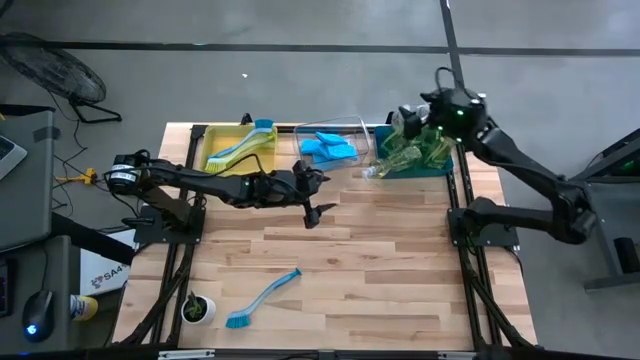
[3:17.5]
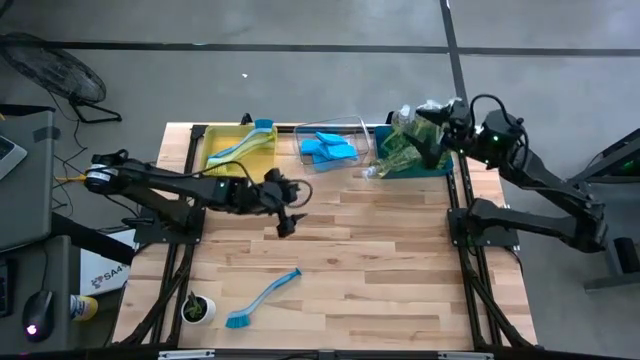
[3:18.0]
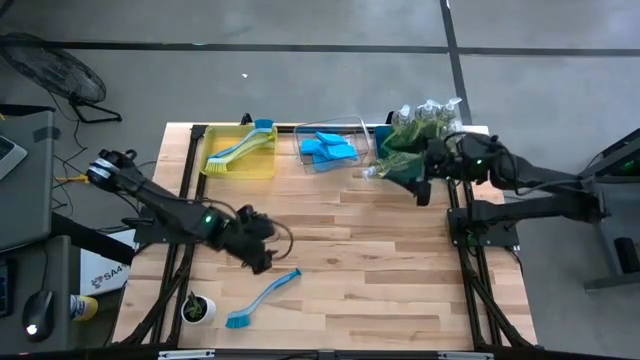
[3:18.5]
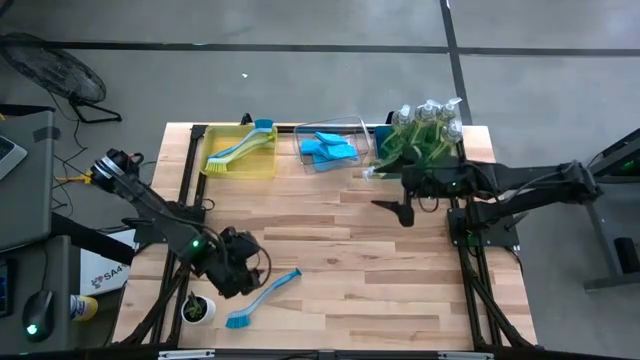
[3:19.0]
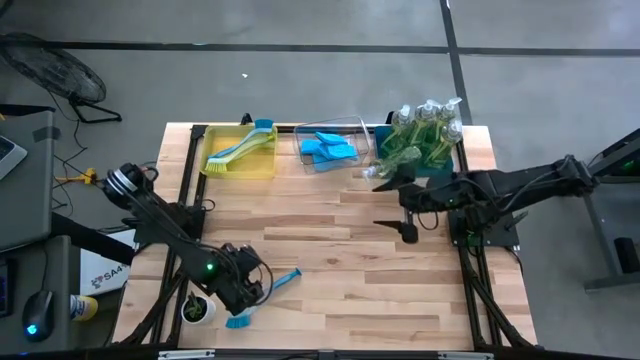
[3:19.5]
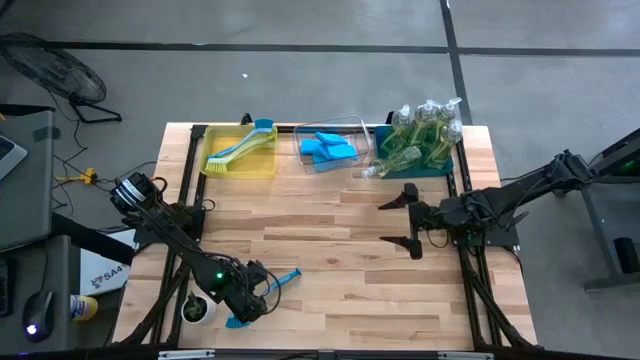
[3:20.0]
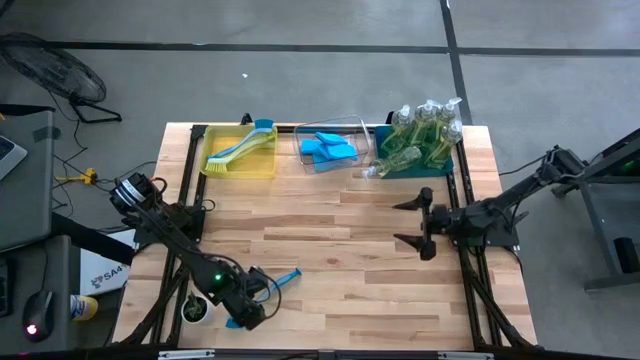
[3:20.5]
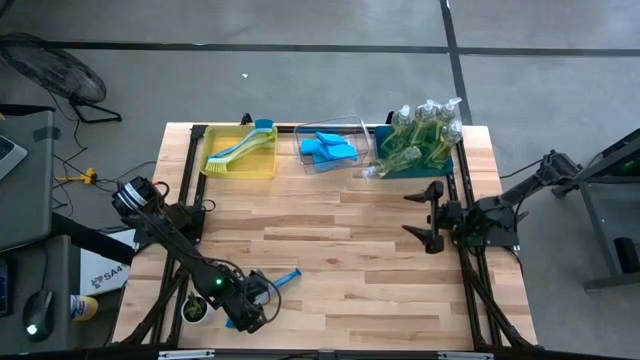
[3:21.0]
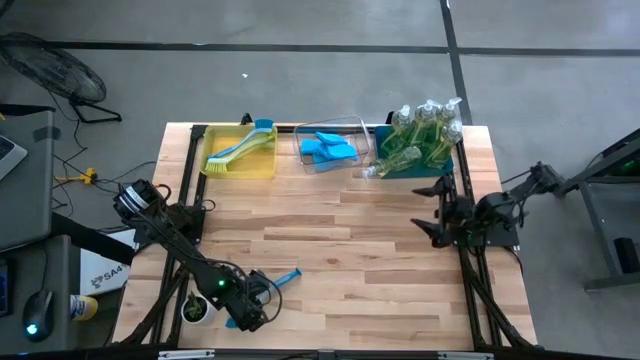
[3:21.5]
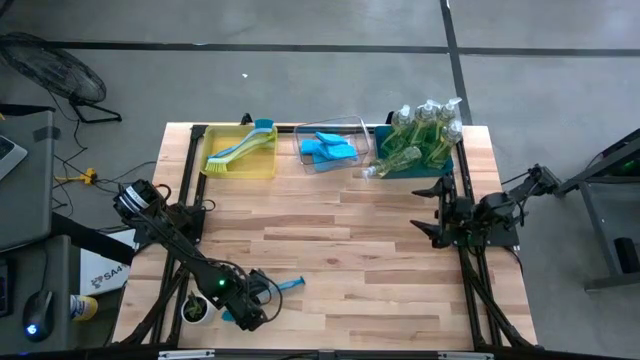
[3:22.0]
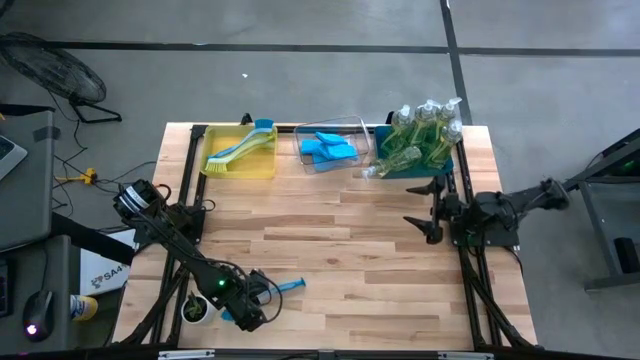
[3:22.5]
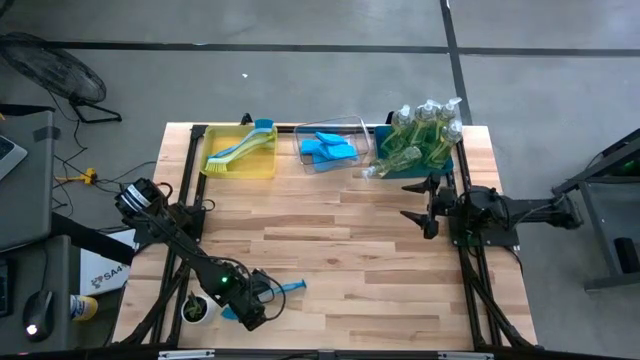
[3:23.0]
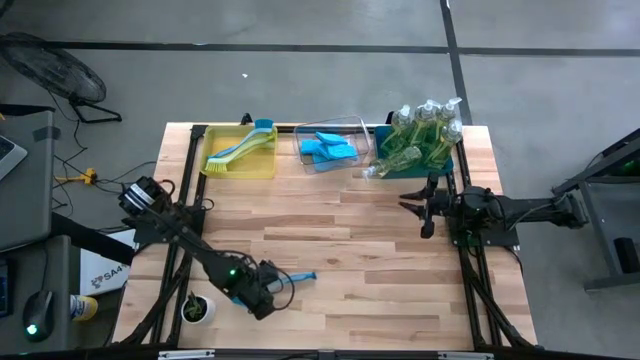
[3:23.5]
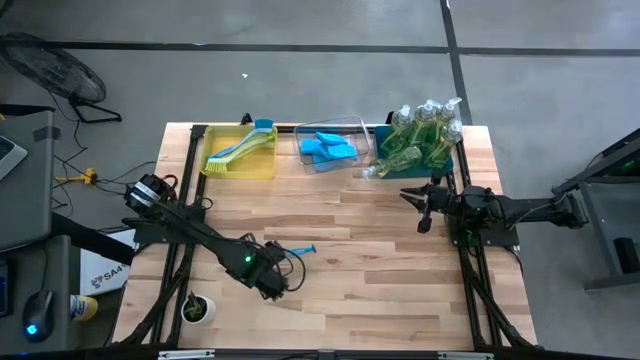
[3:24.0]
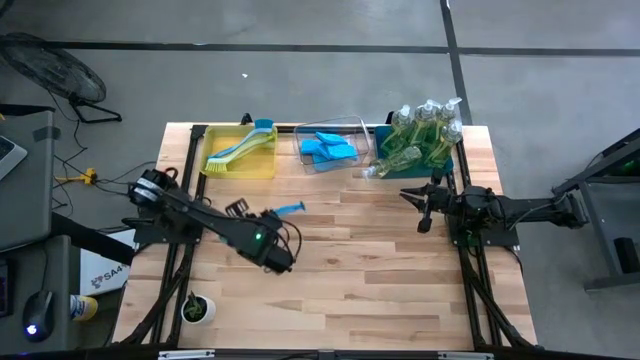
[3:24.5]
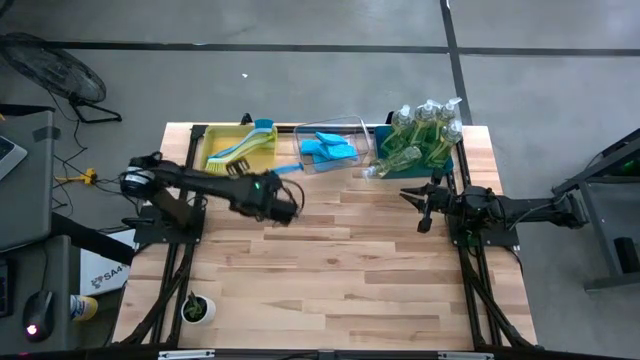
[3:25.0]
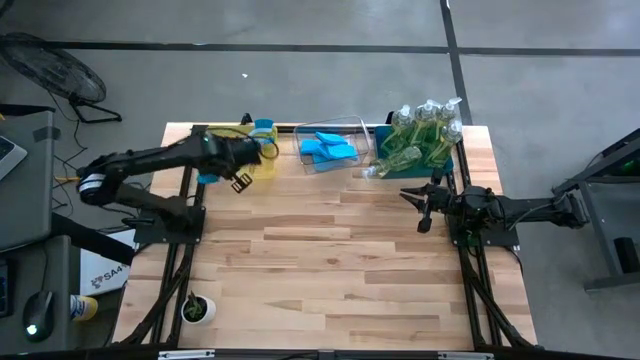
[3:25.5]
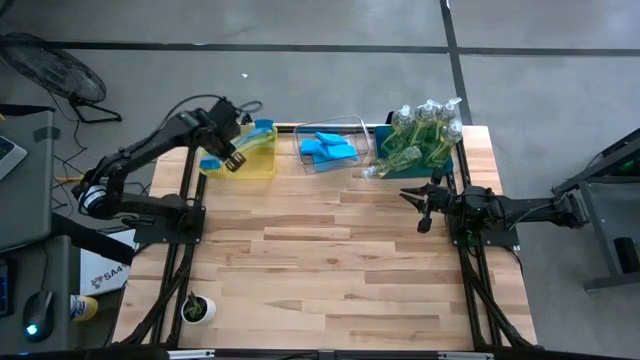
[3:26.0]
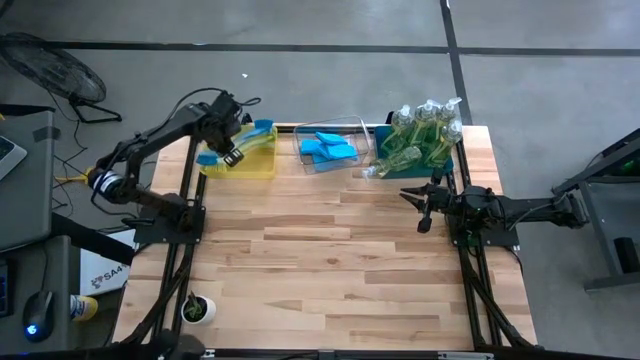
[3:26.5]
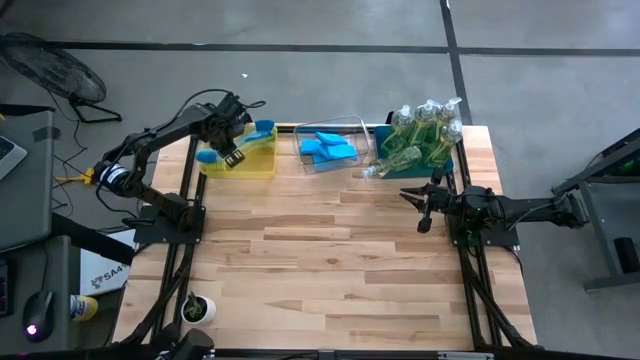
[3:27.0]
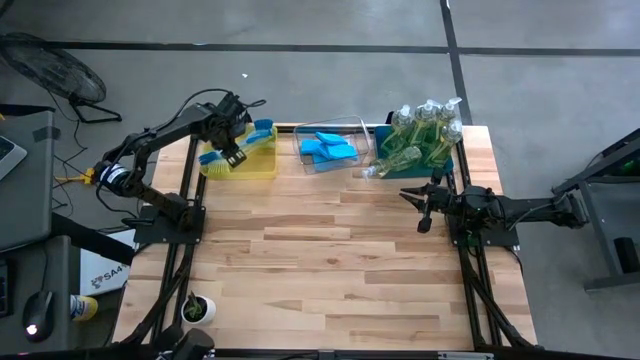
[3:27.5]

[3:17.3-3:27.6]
Task: Pick & Place Kitchen Sink Supplies
Put the blue dish brush into the yellow bin

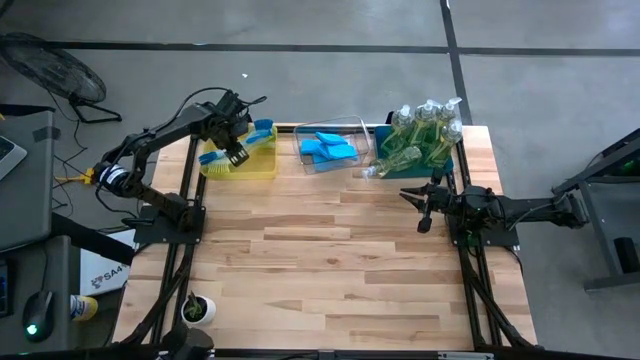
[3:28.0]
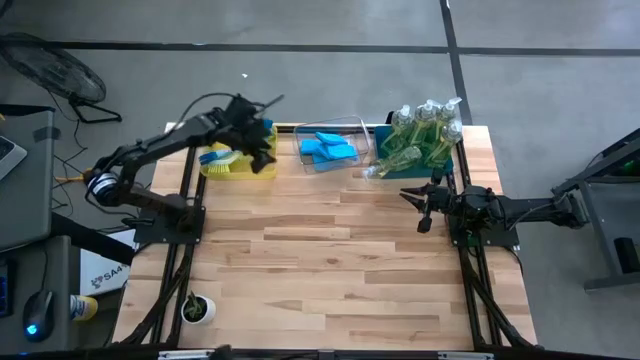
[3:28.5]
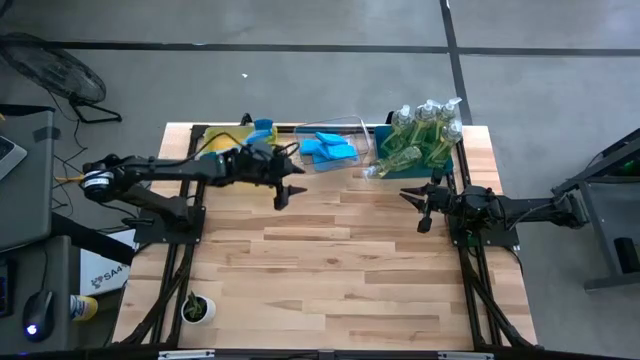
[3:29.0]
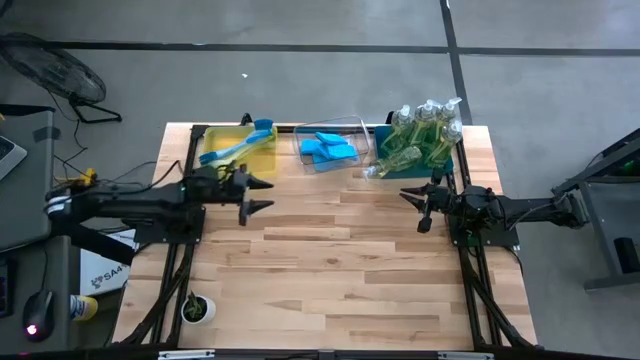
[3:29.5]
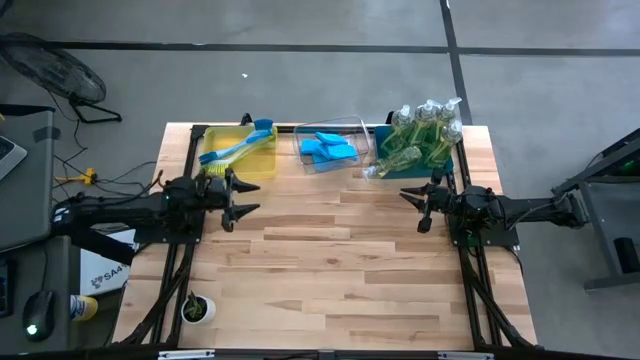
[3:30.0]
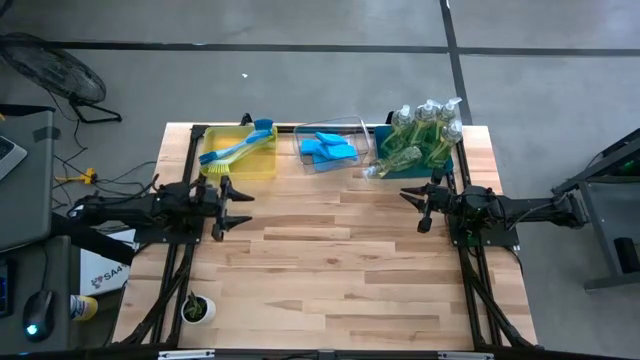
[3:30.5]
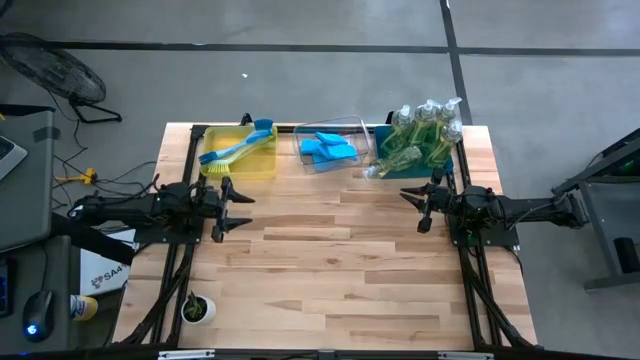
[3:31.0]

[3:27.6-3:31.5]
Return to Home Position

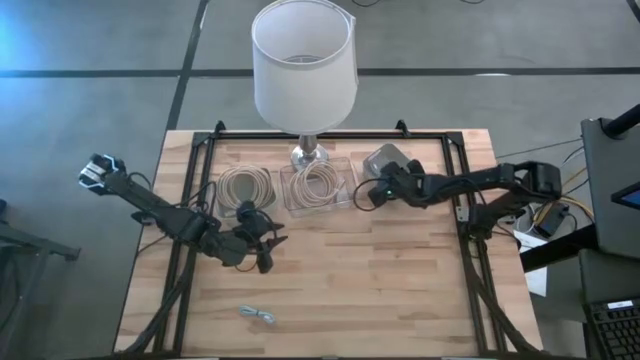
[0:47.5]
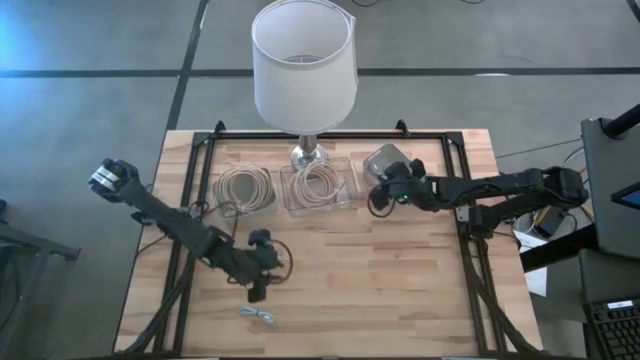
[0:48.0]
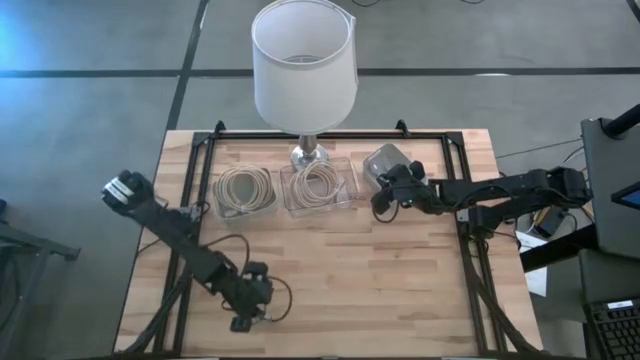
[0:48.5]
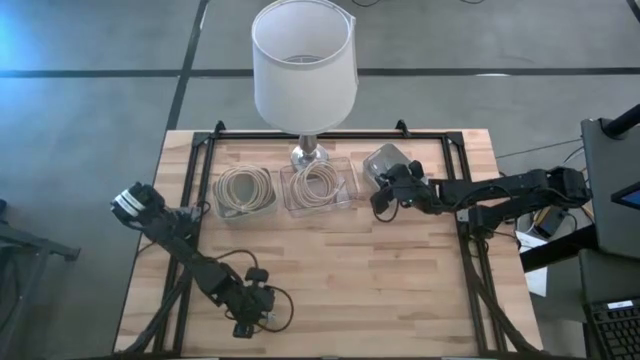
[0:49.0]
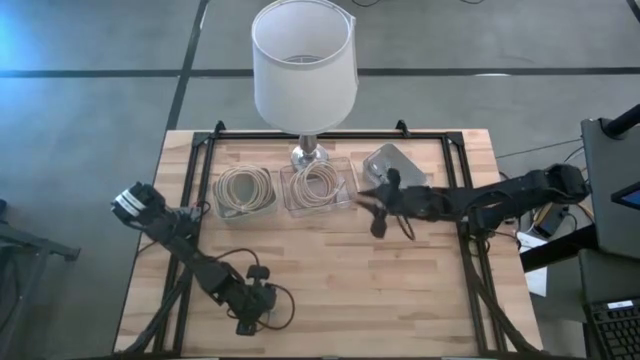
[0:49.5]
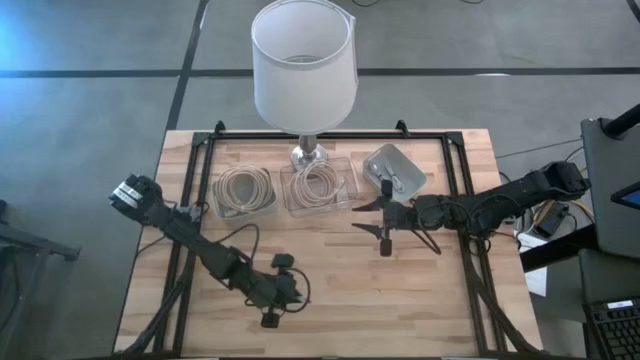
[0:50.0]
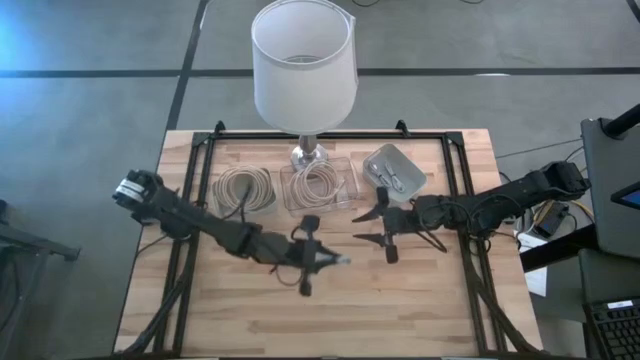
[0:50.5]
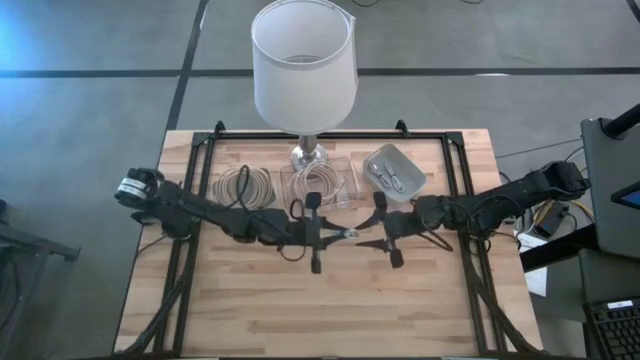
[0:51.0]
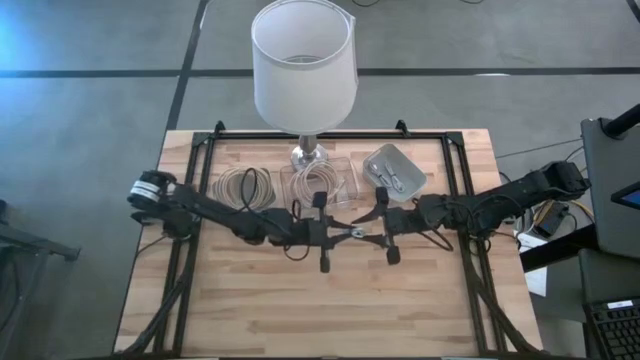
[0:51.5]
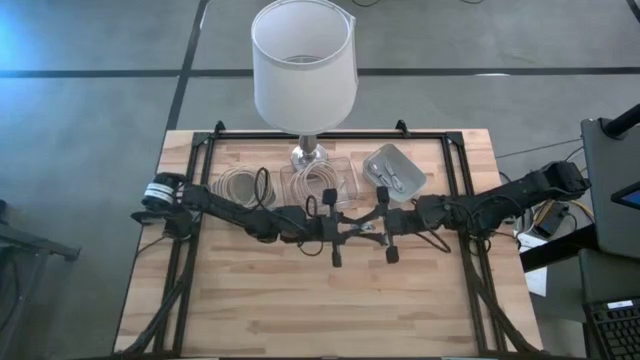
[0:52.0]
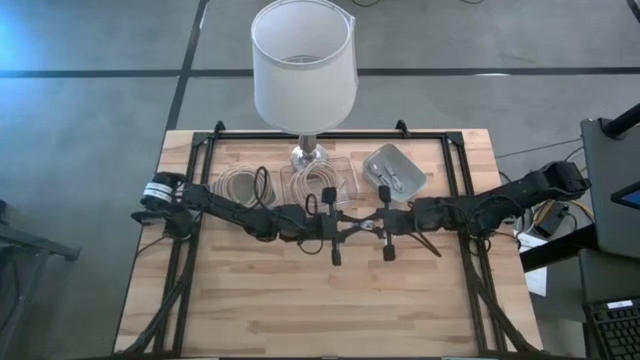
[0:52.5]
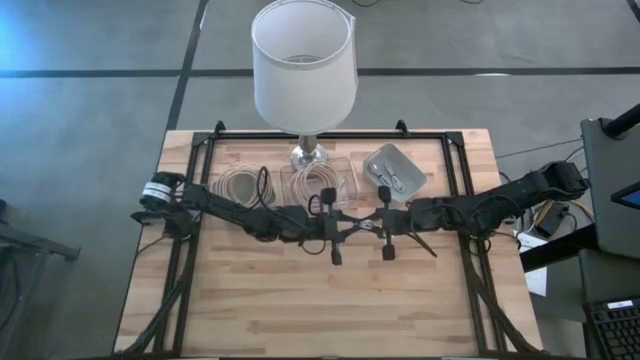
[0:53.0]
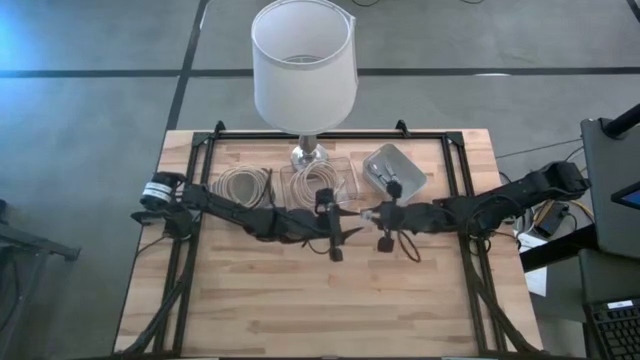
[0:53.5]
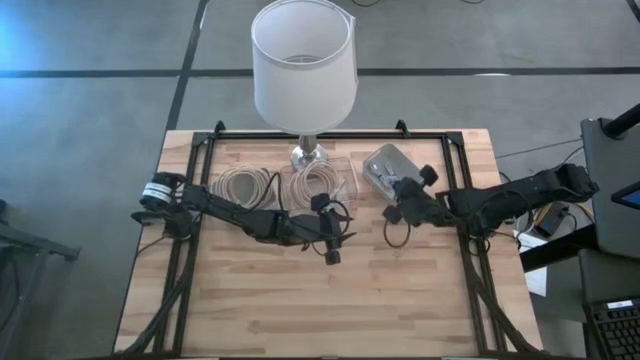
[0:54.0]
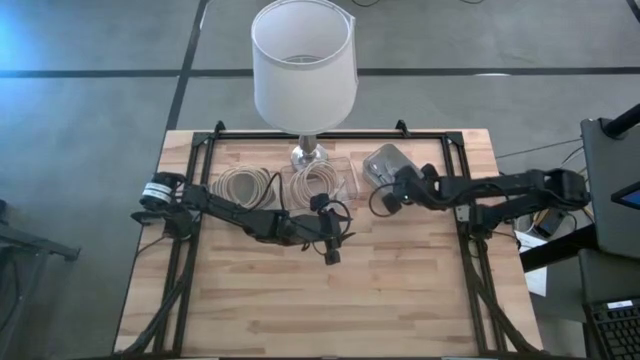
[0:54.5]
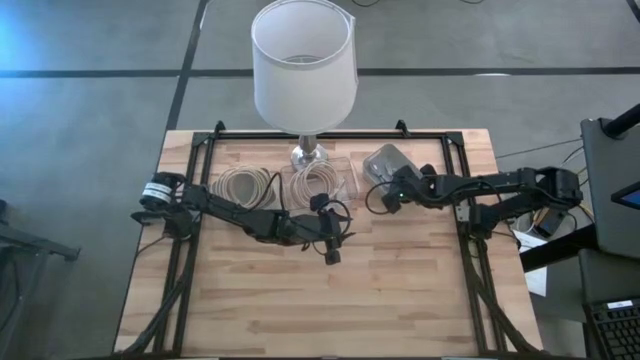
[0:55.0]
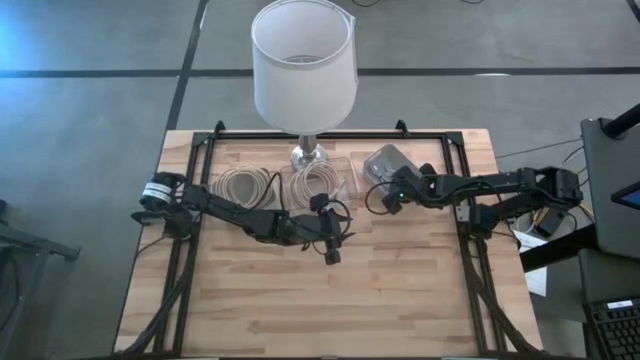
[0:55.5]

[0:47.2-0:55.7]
Task: Pick & Place USB Port
Put the blue charger cable into the right gray bin
